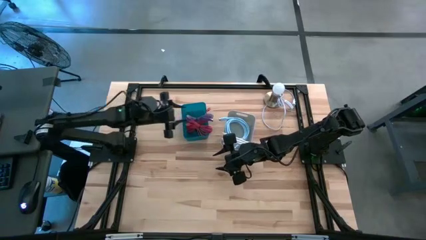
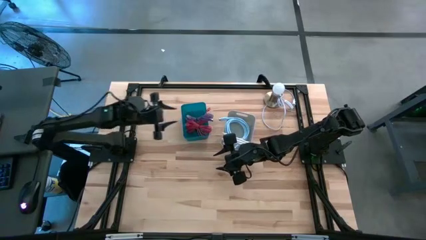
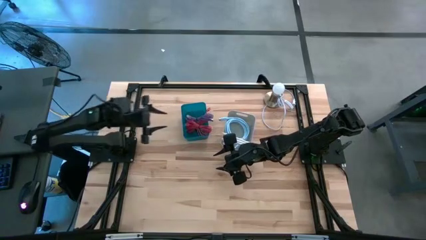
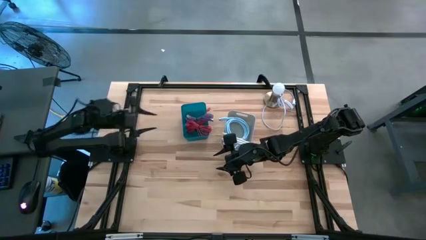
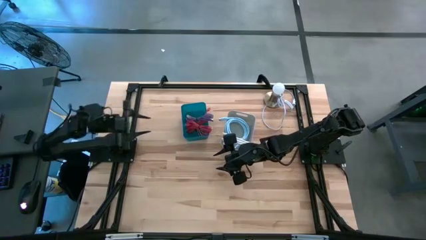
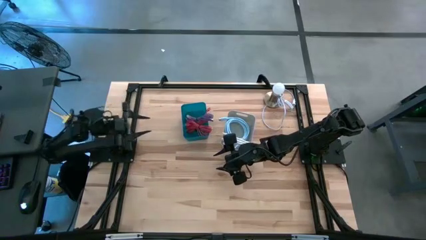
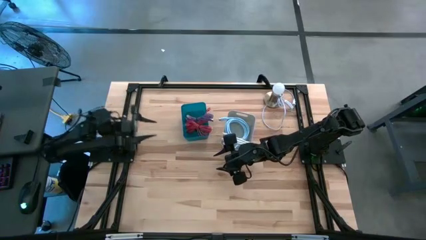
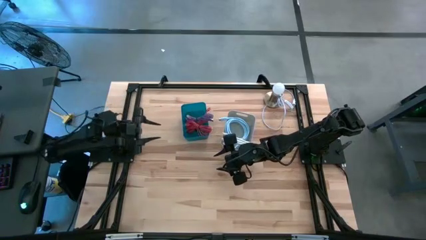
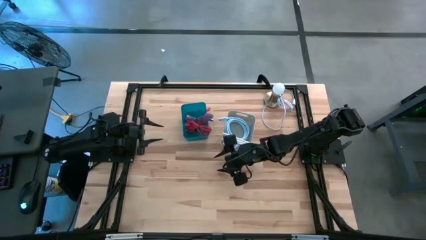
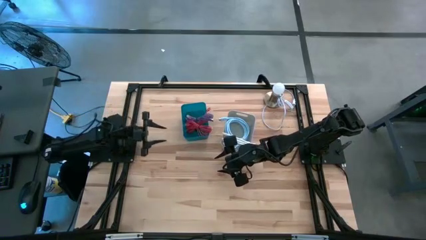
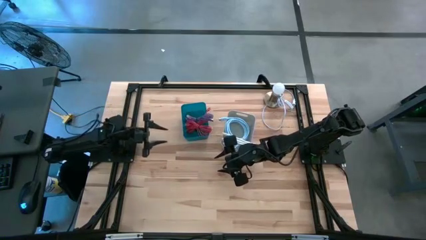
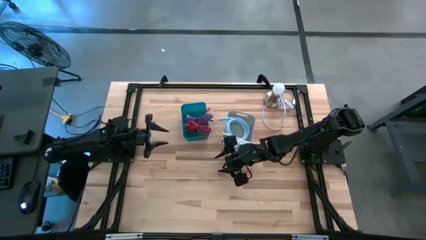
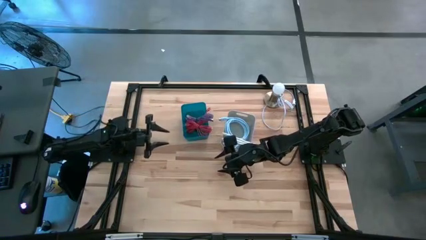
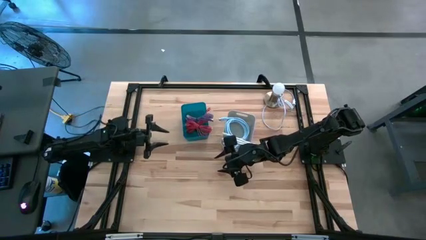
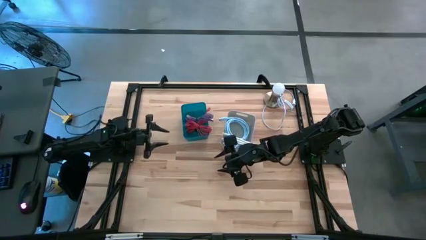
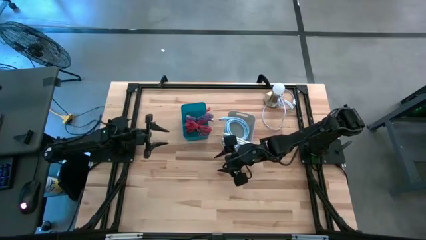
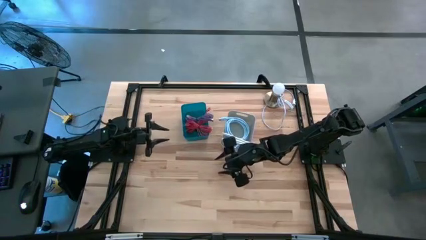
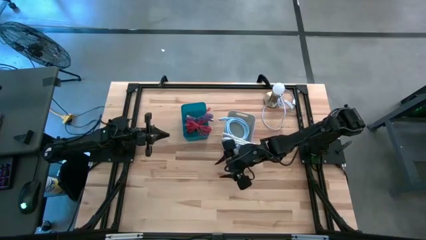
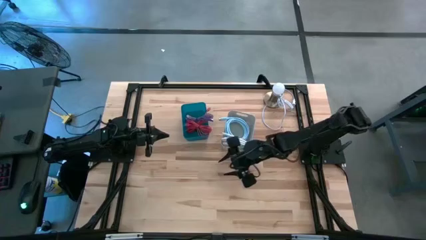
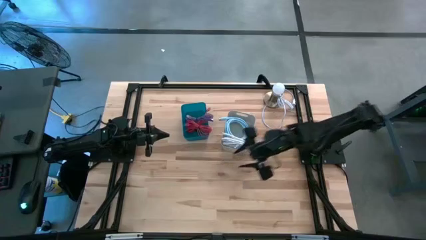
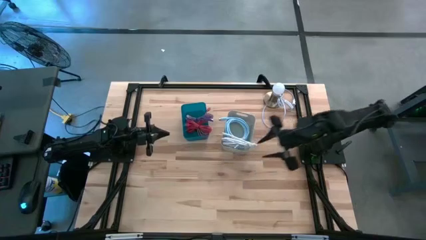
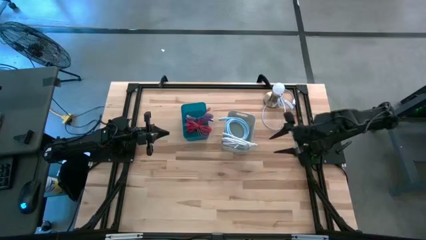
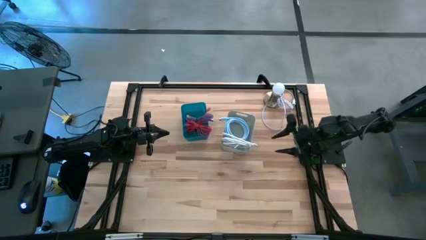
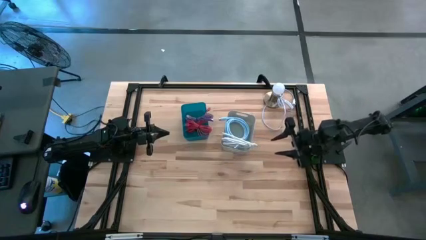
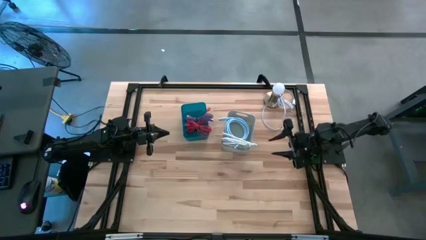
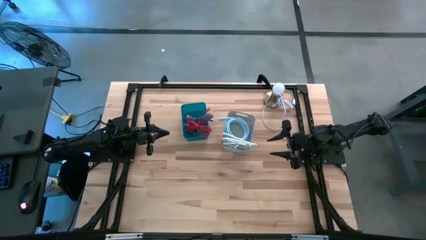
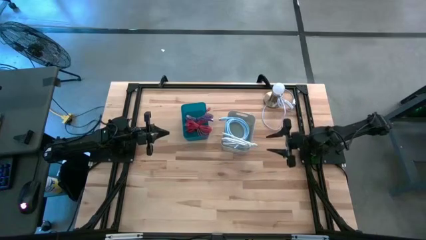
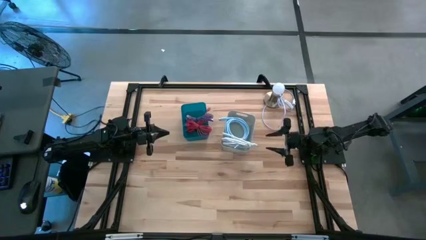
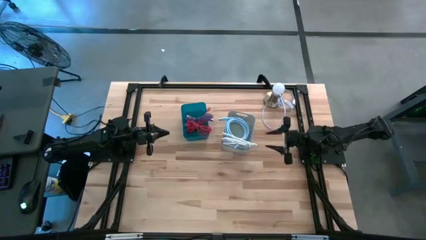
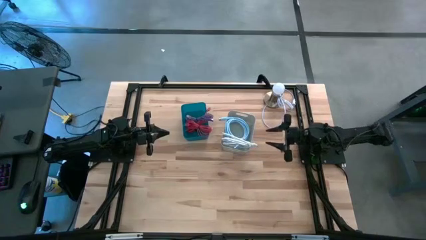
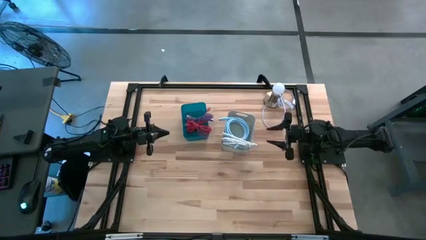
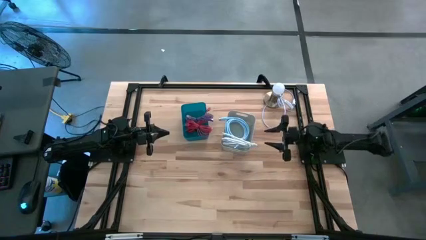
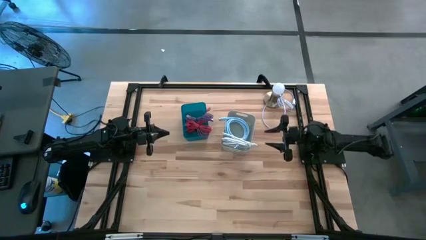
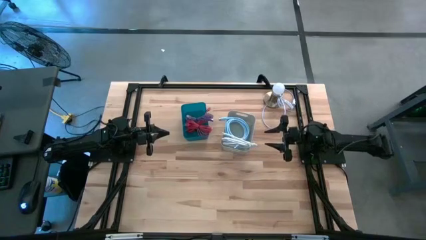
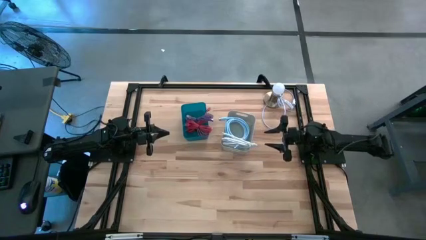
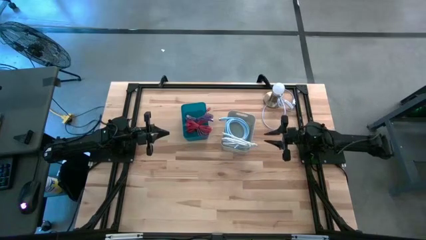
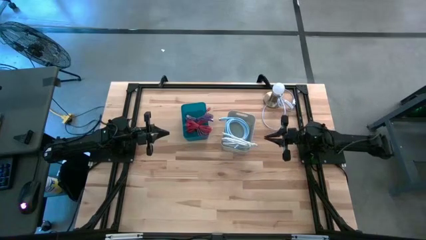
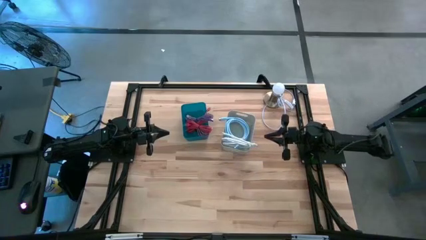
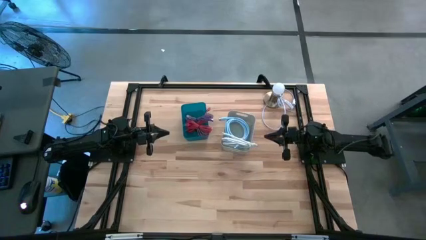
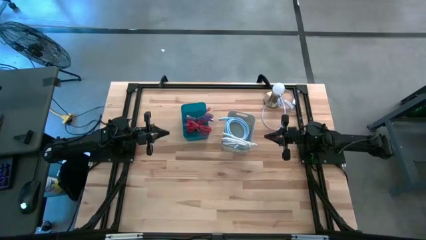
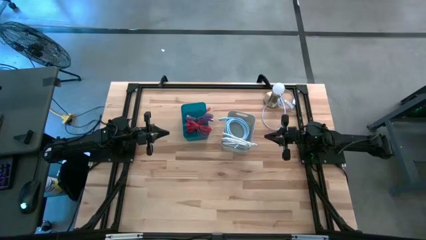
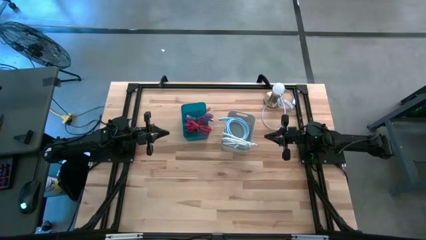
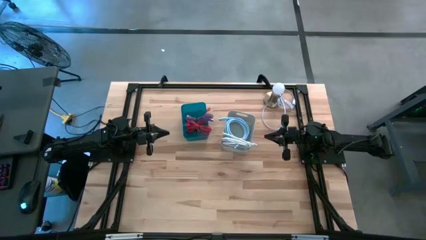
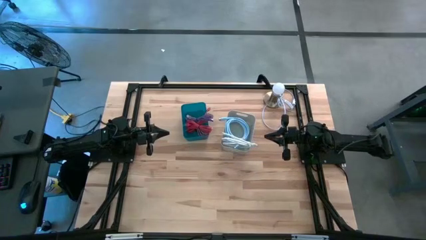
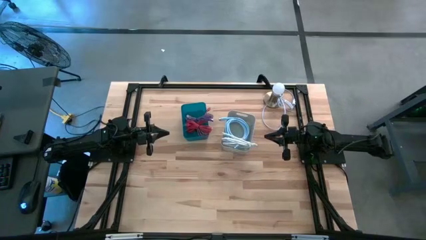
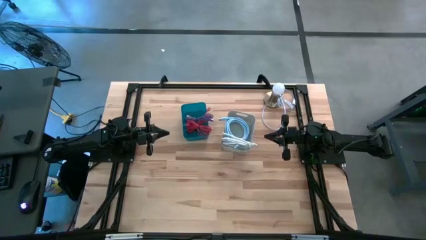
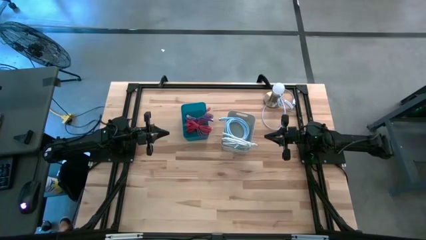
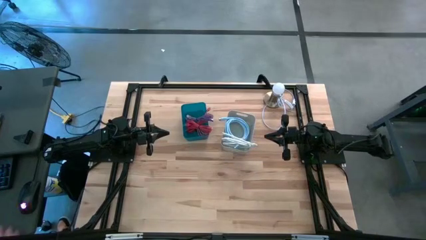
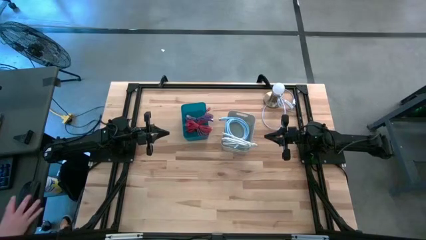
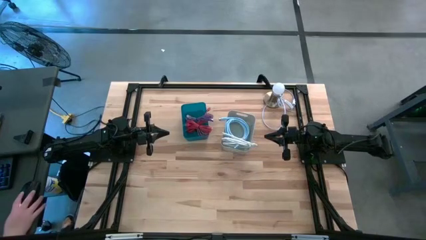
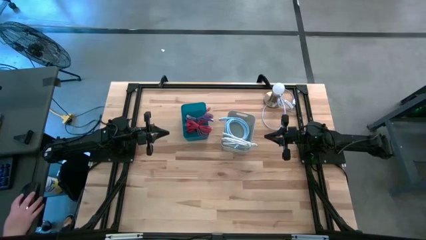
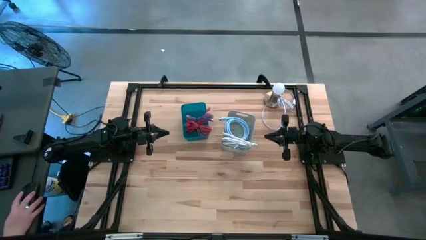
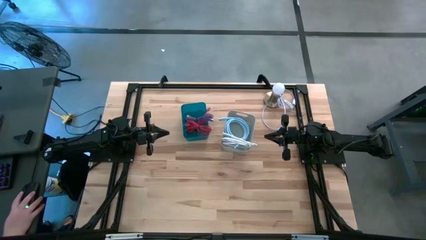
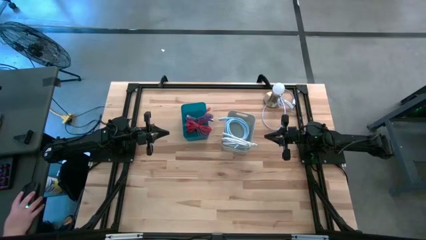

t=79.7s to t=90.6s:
Task: Pick & Place USB Port
Return to Home Position

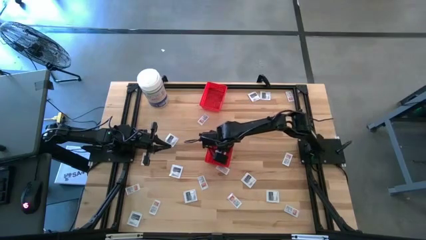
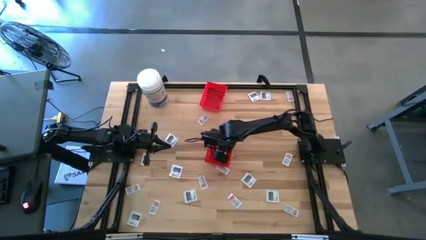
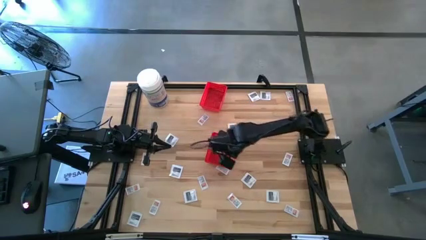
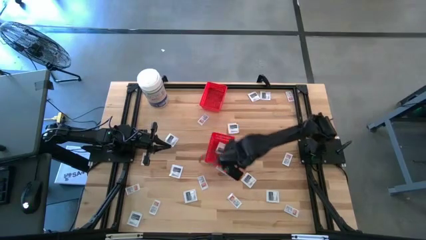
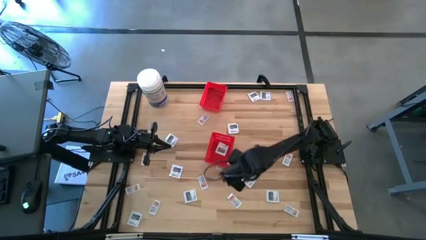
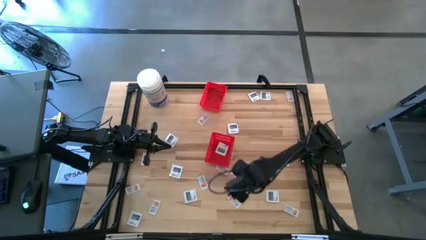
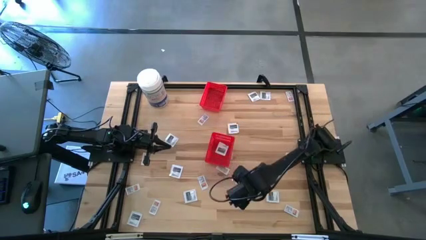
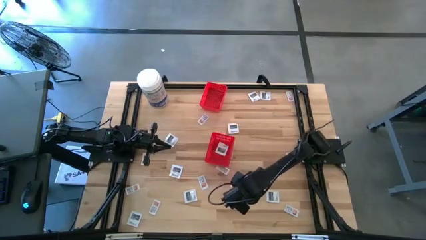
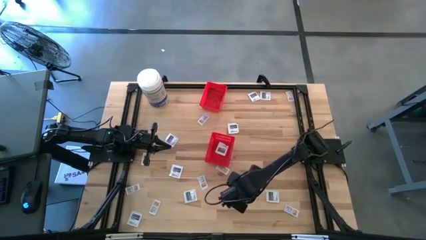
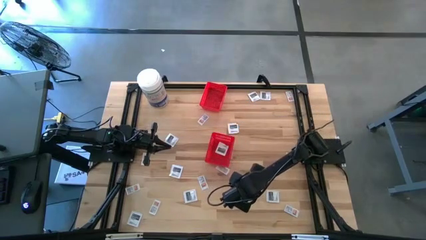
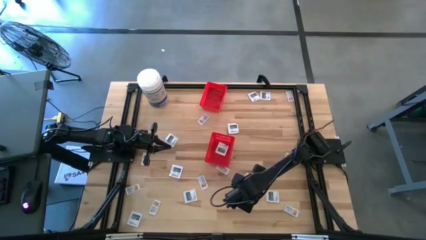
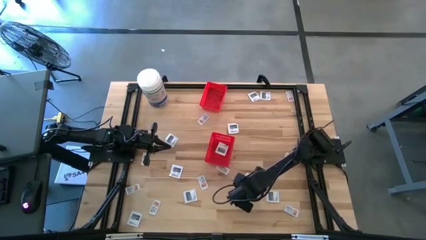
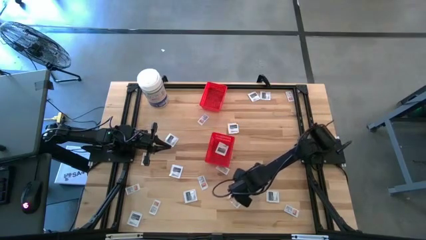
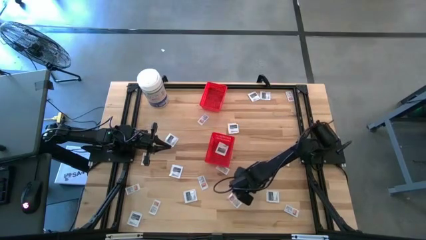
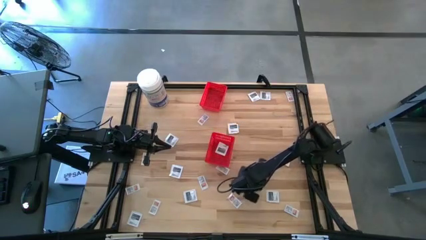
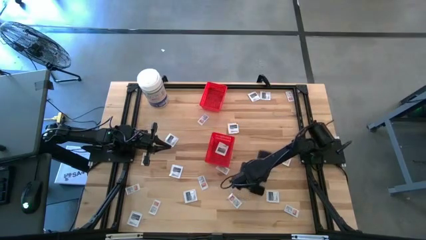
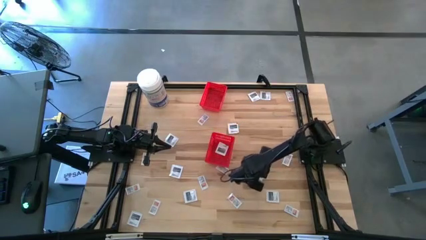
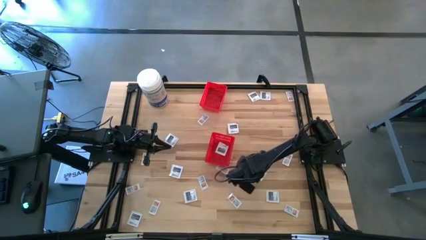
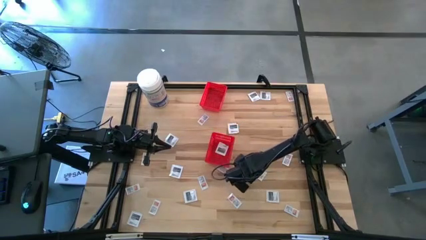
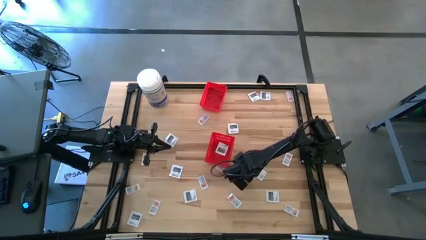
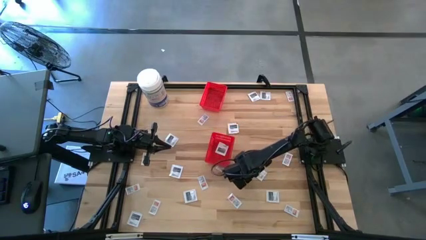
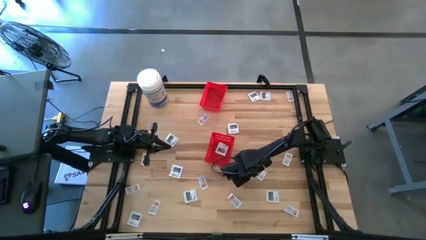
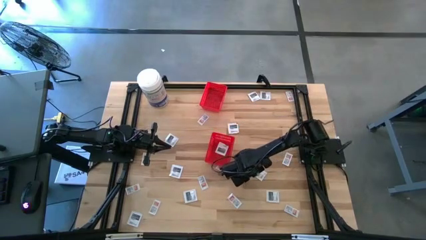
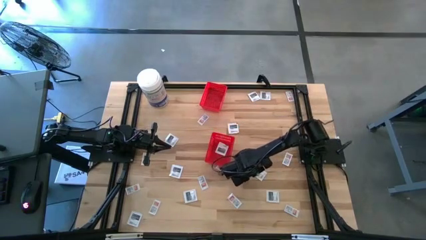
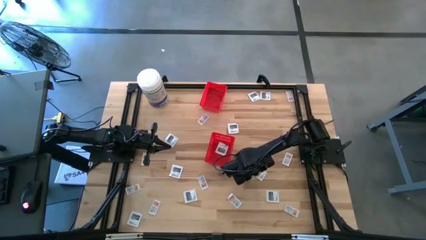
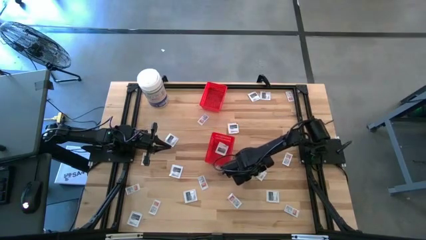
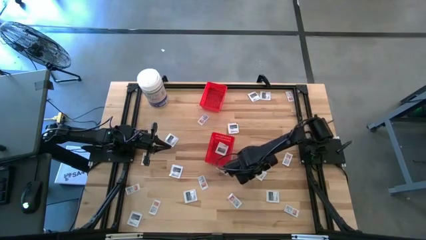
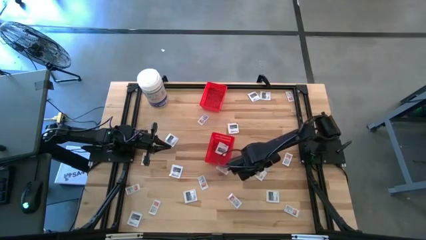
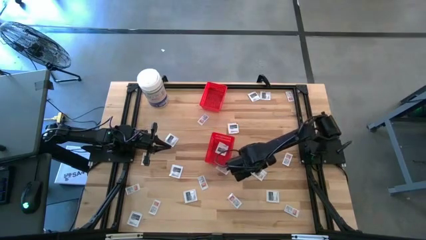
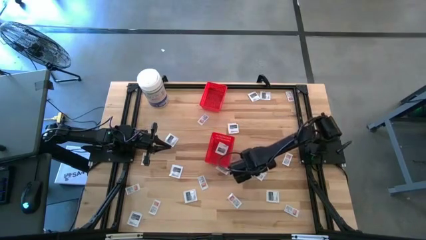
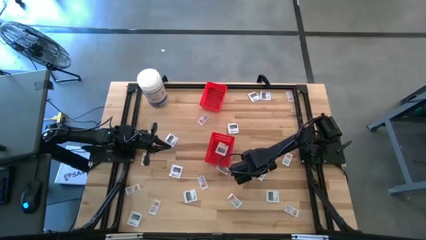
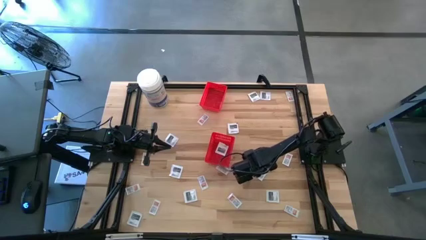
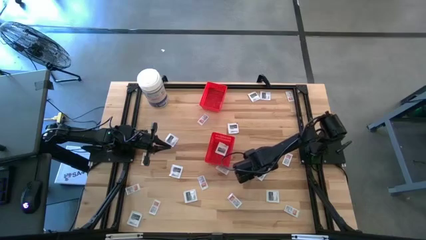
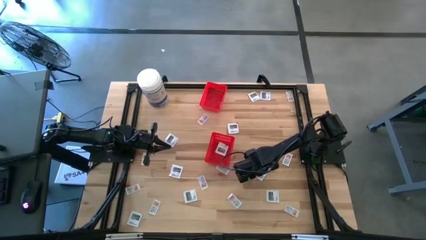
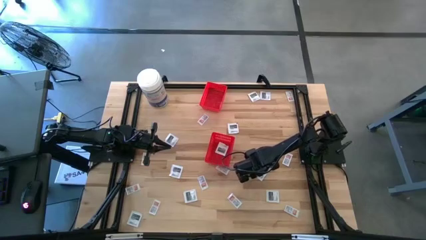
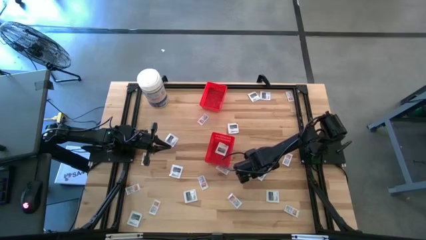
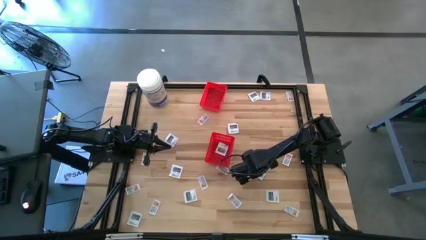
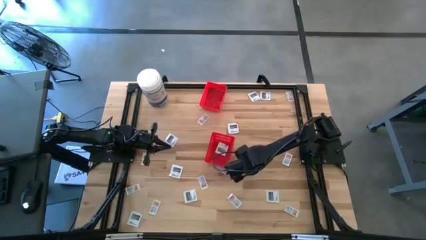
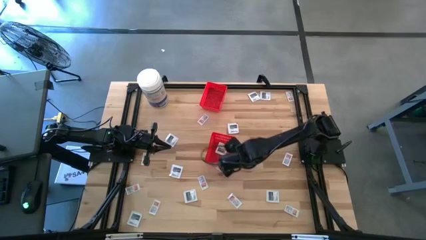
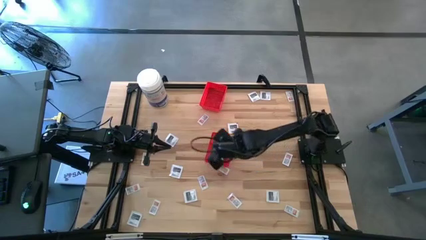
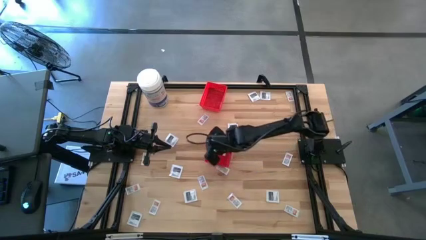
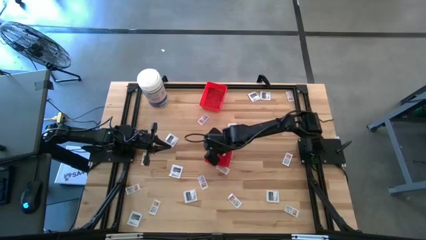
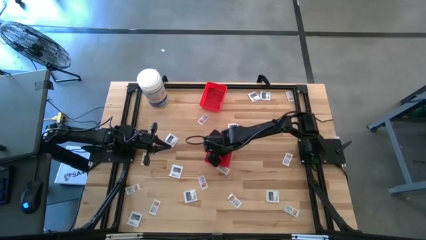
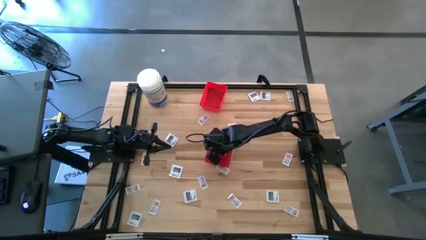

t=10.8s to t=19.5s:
Task: Pick & Place First Aid Supplies
Put the white towelette pack into the bottom red bin
